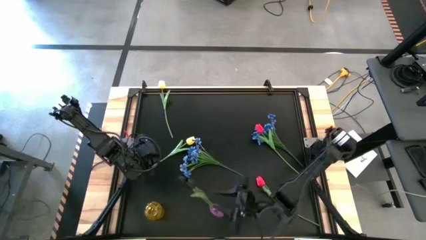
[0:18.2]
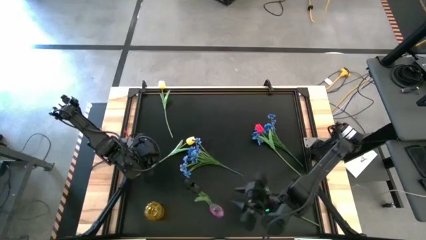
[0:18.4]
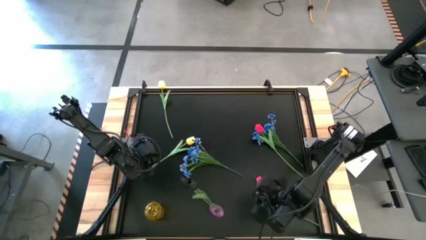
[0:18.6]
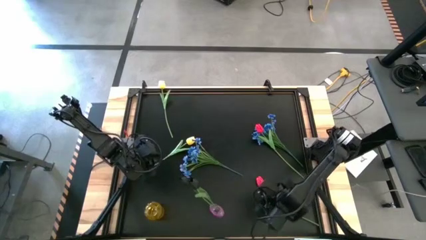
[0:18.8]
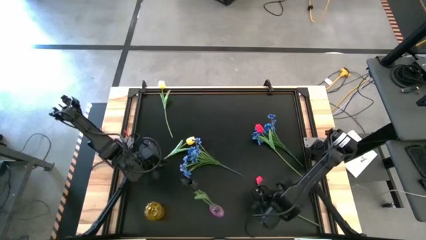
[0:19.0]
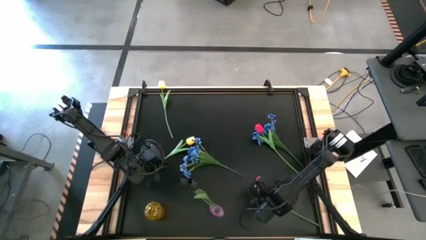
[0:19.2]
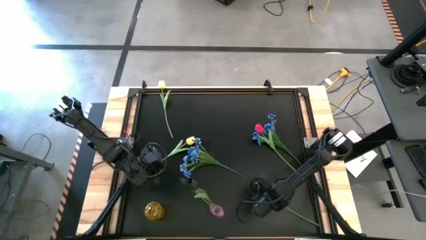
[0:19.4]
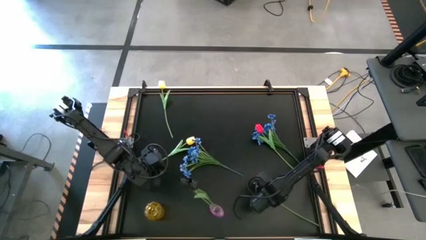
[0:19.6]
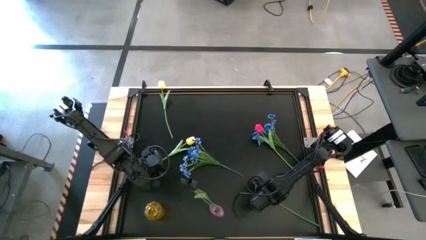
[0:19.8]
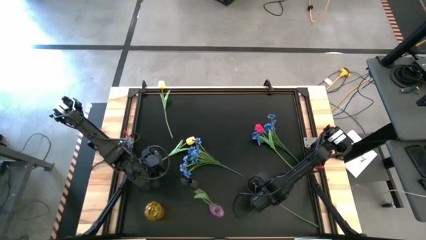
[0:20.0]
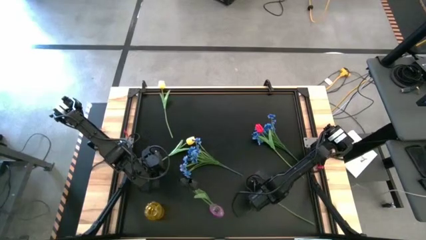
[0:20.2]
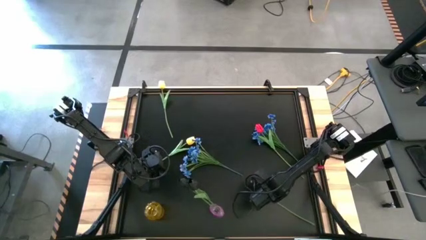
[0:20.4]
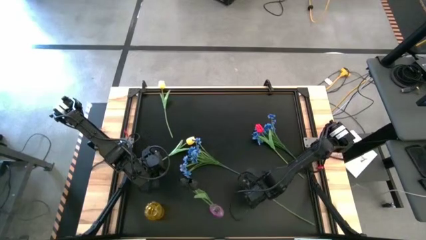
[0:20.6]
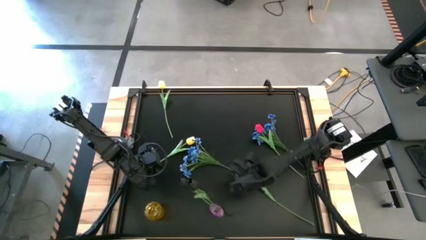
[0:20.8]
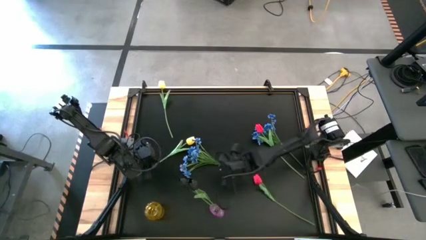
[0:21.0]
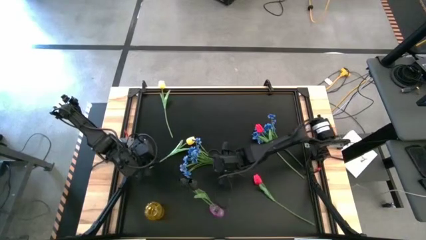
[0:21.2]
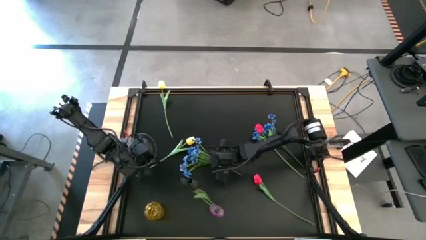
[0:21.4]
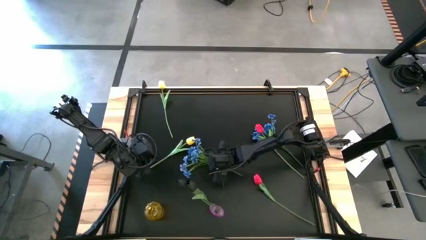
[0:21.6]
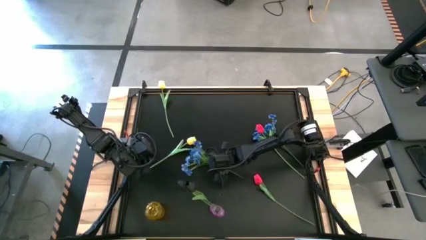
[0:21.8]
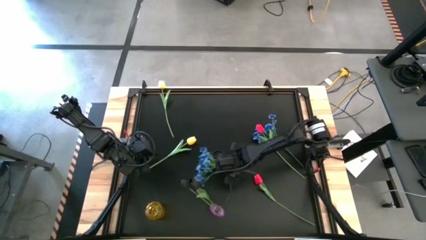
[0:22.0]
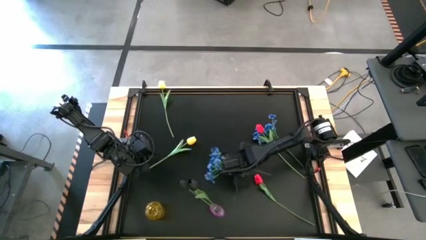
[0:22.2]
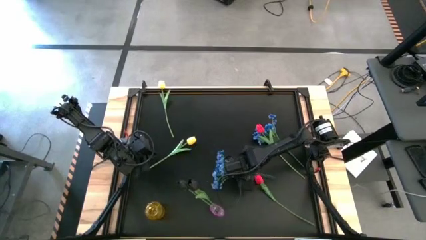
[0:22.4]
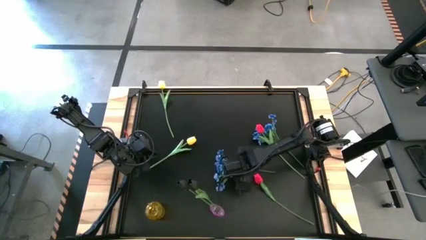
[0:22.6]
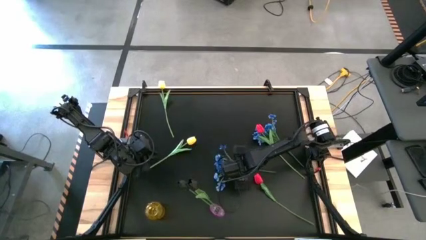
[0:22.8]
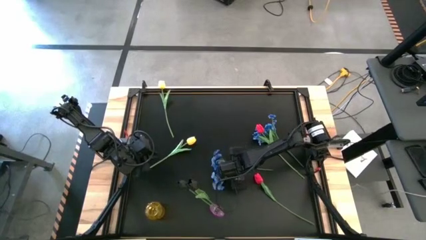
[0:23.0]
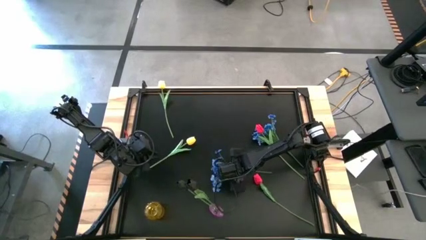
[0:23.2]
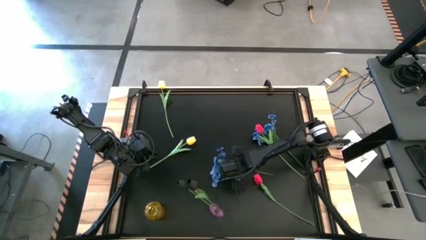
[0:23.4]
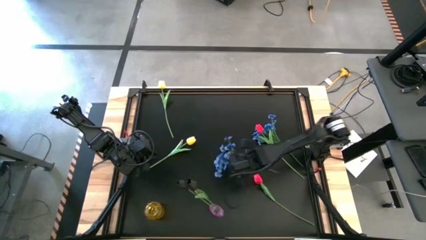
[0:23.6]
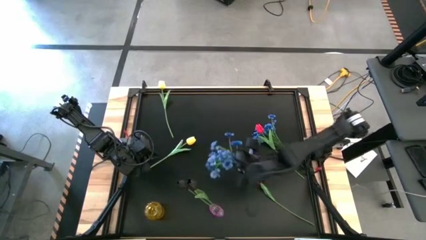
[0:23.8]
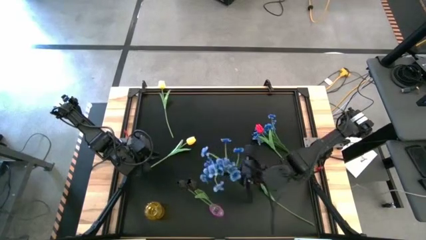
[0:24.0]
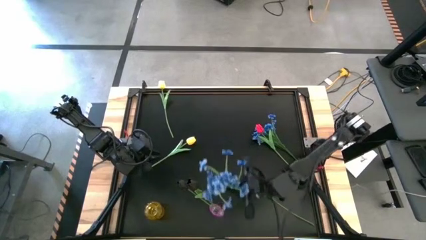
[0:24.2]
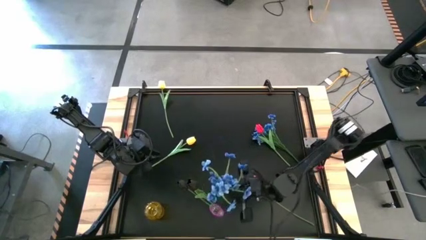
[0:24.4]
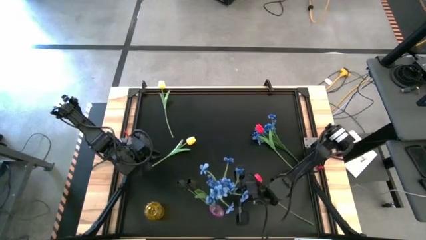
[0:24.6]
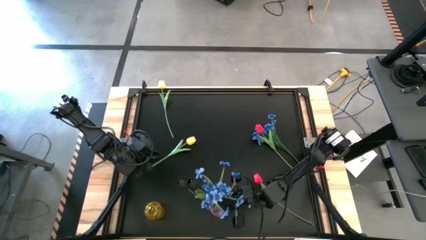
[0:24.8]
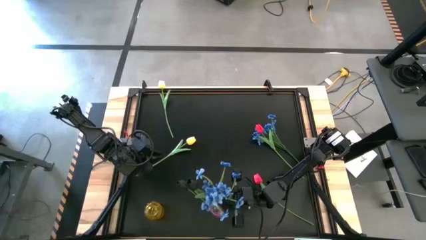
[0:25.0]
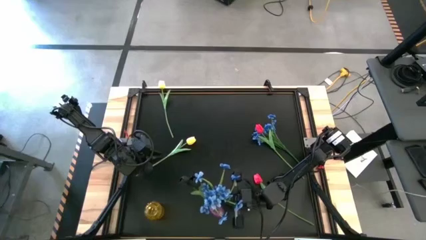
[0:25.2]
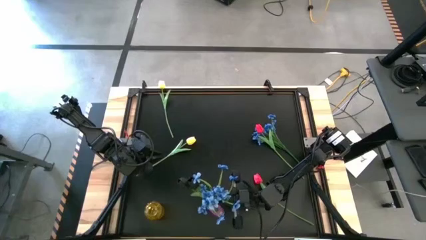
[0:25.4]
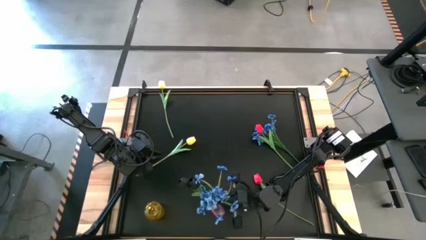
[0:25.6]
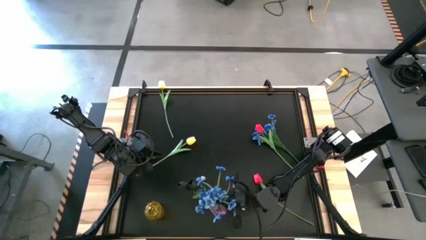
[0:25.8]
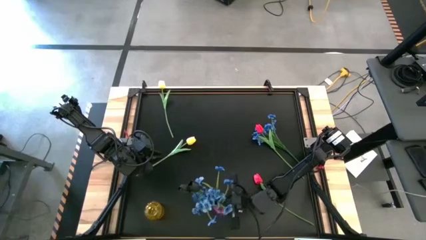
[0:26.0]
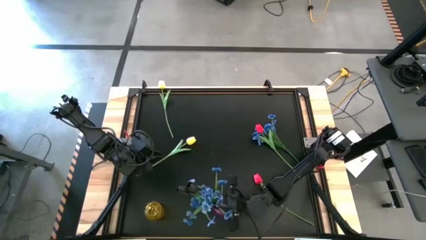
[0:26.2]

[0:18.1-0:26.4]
Task: Sort flowers into vase by color
Put the bottom blue flowers into the violet vase

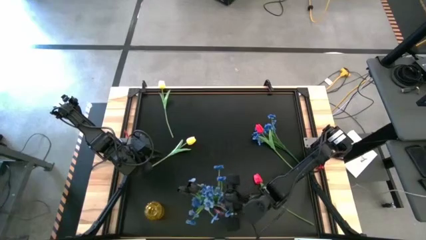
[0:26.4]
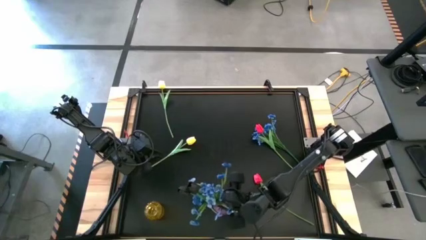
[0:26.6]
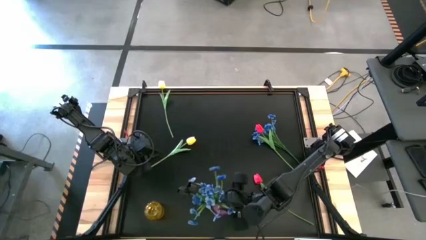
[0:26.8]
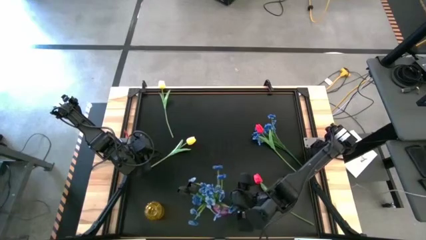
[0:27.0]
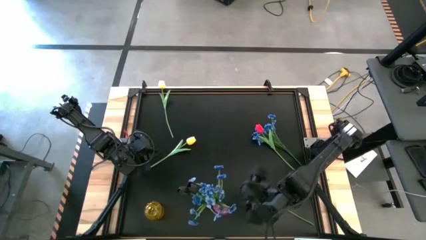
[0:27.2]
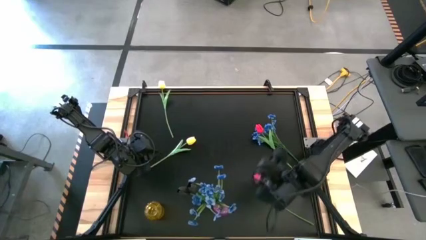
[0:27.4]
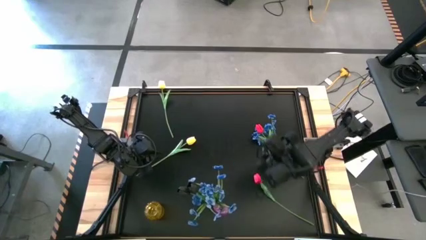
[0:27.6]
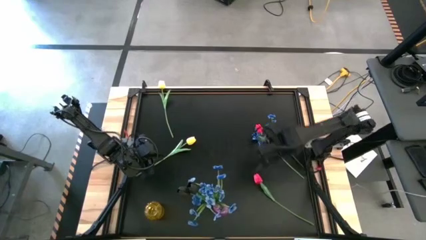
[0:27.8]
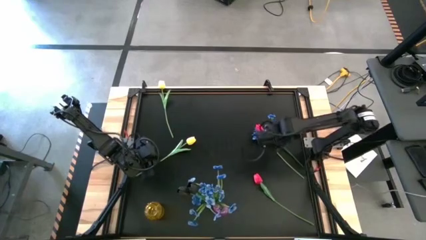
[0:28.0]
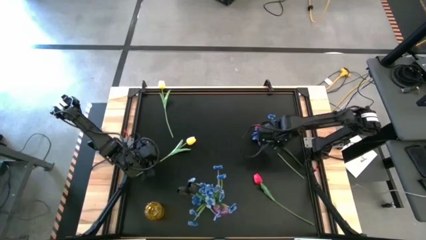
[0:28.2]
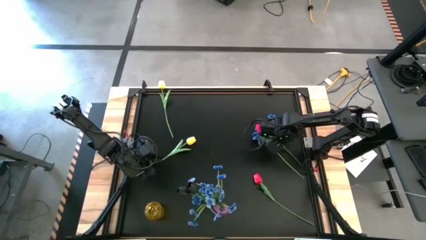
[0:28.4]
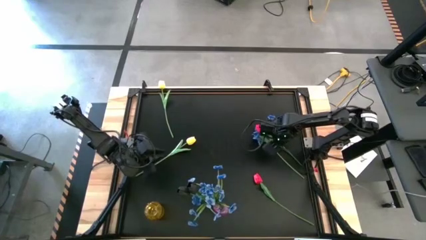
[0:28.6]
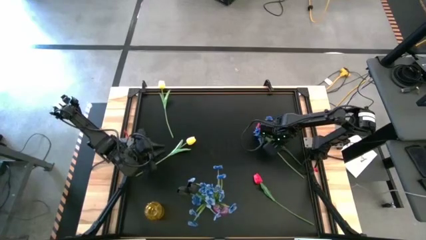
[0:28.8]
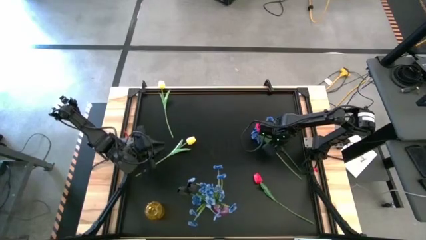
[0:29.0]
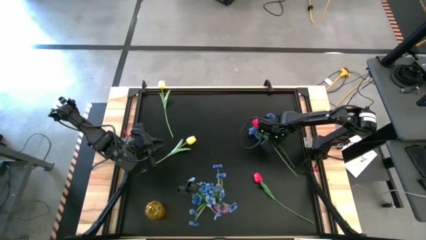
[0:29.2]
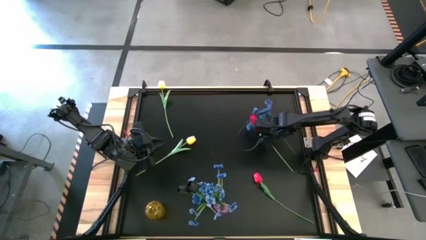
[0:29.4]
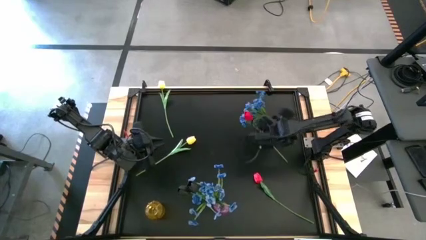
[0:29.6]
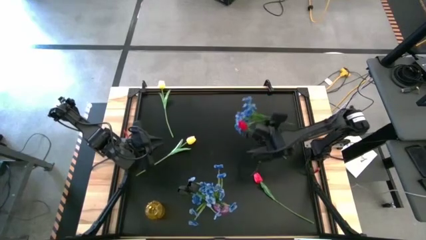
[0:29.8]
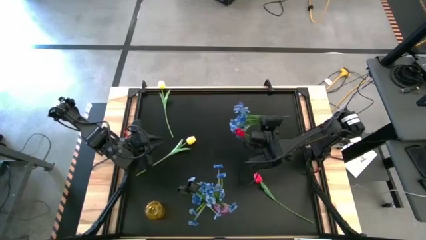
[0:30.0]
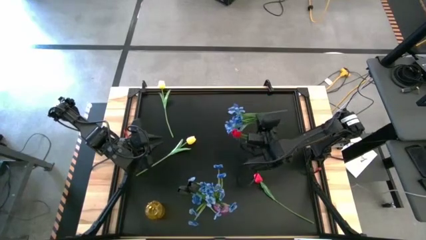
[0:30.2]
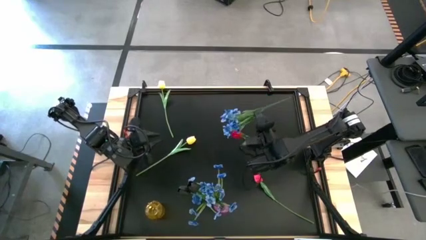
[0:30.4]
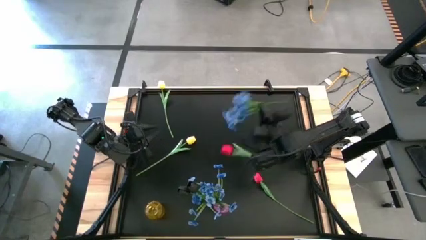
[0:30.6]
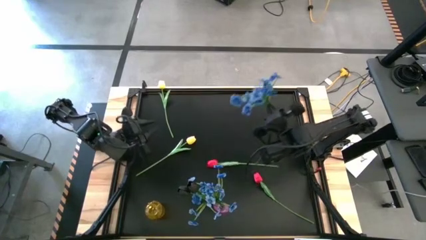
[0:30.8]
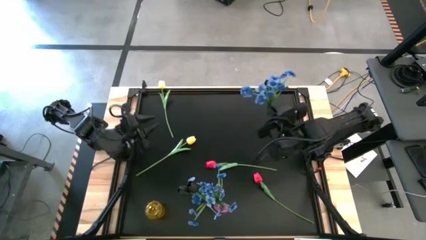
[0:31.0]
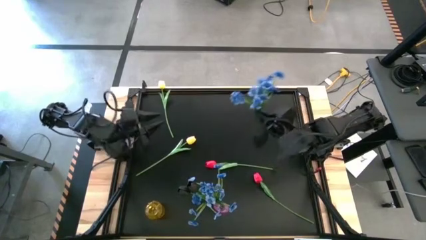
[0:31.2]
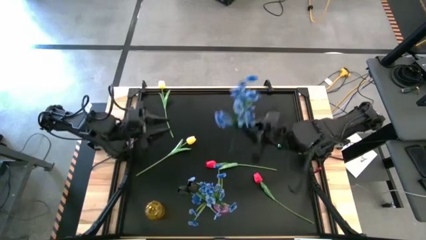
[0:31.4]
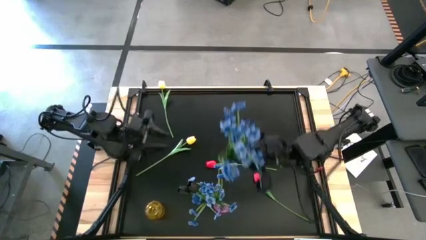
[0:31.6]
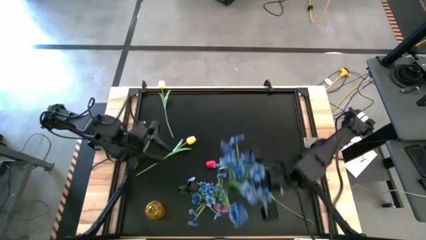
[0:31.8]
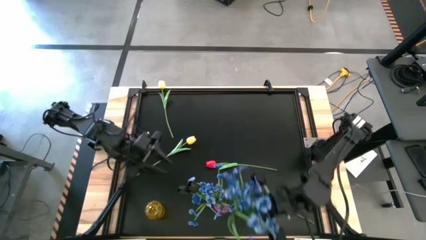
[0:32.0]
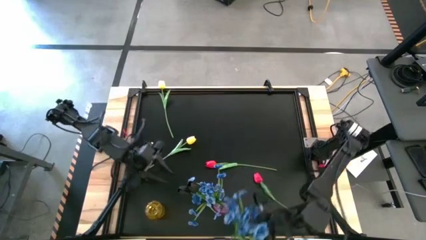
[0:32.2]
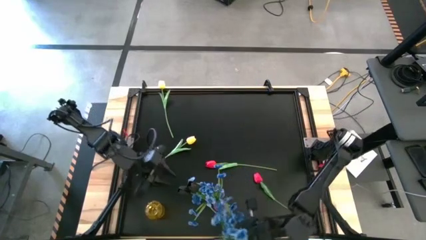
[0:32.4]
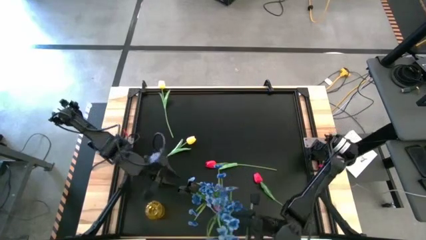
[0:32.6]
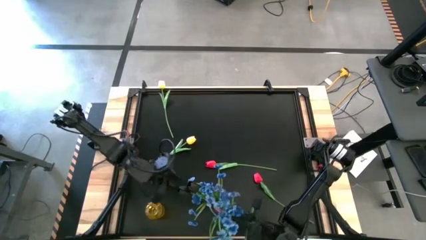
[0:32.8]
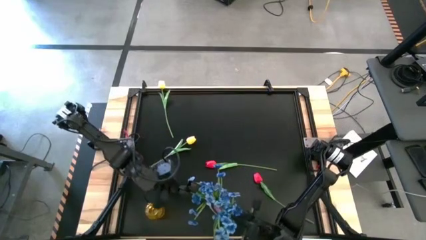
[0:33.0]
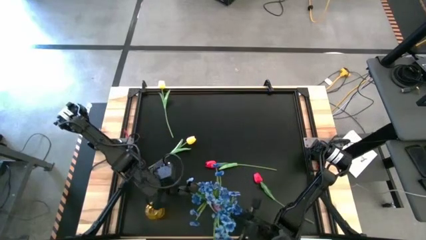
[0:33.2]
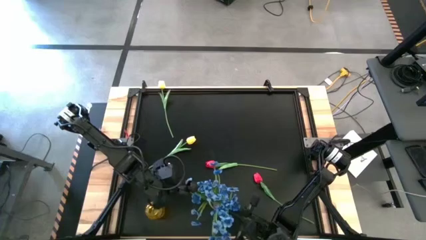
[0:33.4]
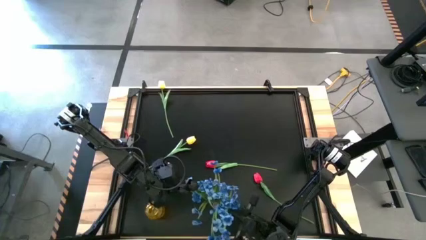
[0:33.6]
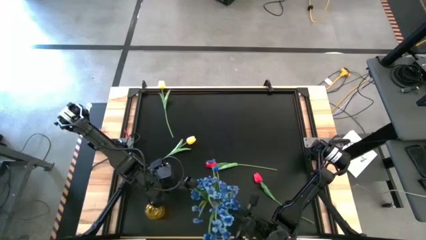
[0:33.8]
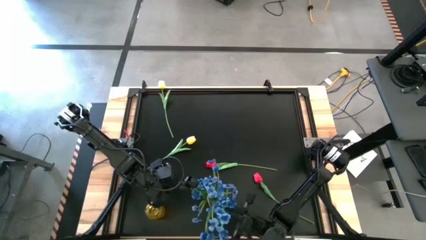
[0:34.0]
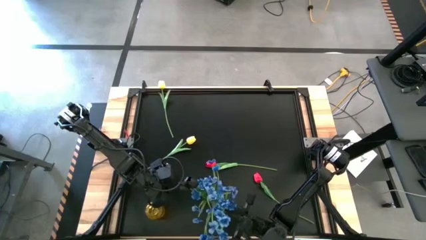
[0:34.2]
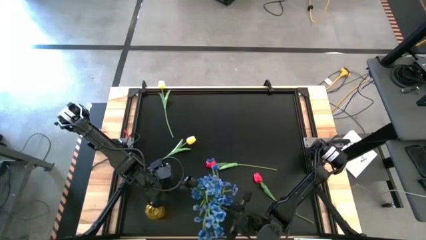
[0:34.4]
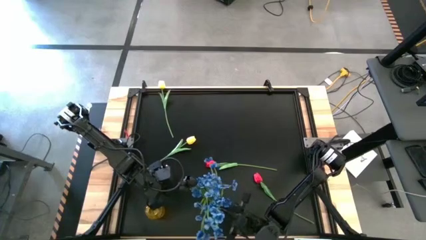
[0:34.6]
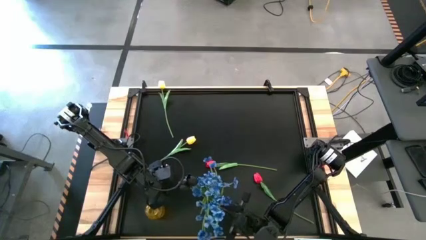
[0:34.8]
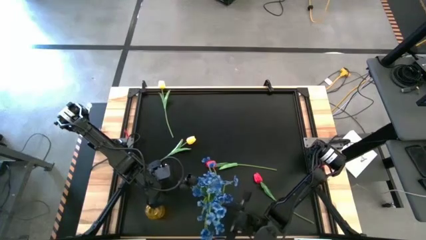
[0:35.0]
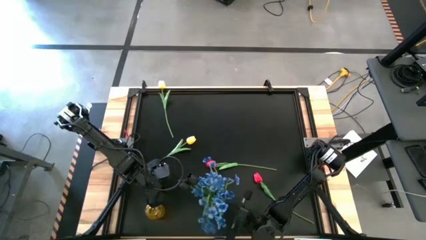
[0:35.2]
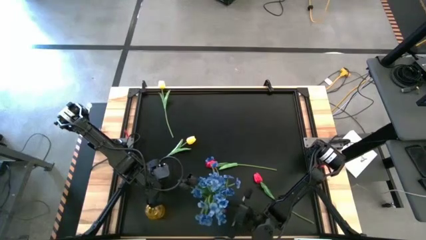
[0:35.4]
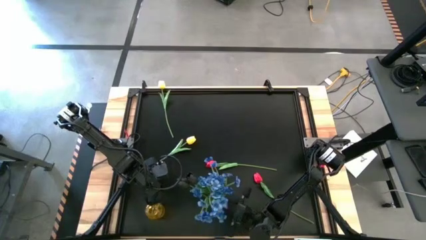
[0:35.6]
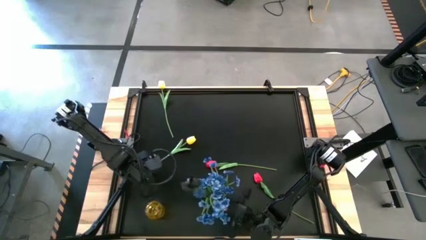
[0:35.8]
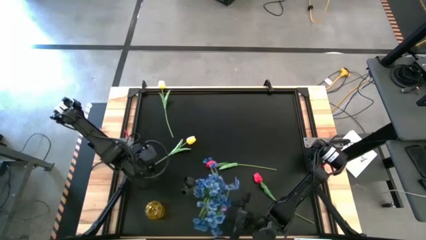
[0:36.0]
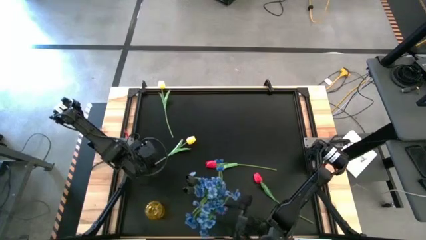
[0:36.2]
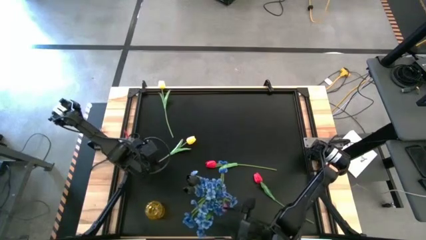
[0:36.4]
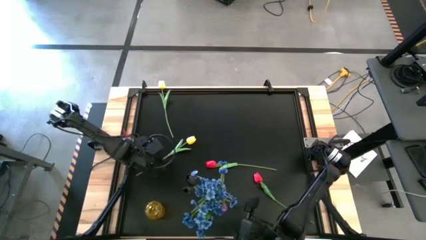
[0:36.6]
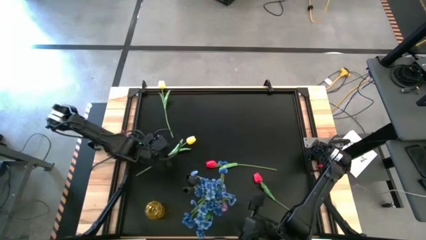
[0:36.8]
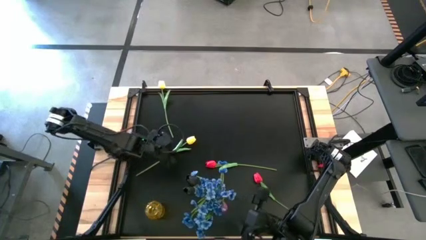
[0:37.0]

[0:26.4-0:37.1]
Put the blue flowers into the violet vase
